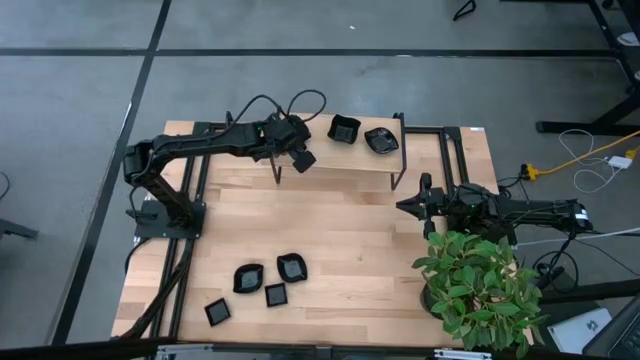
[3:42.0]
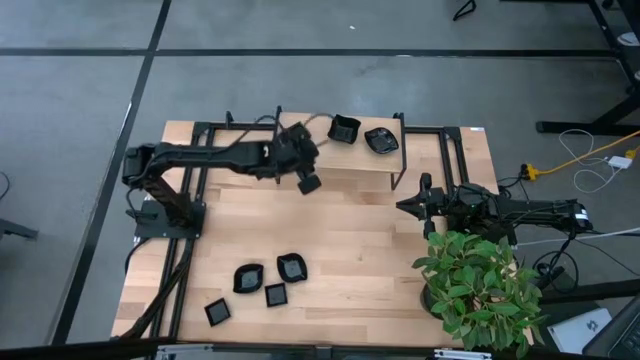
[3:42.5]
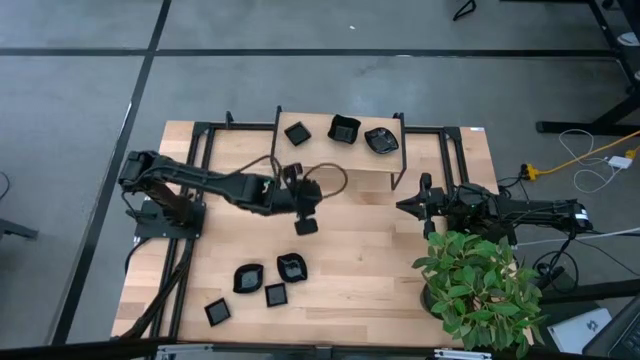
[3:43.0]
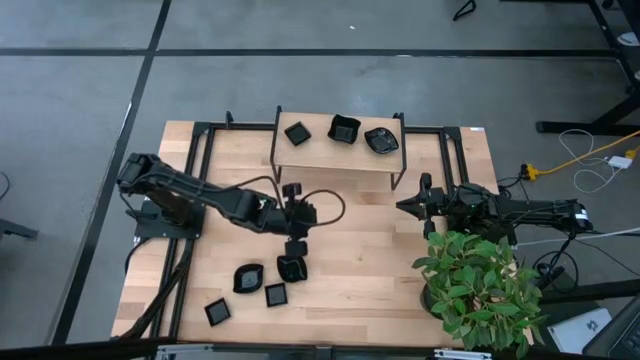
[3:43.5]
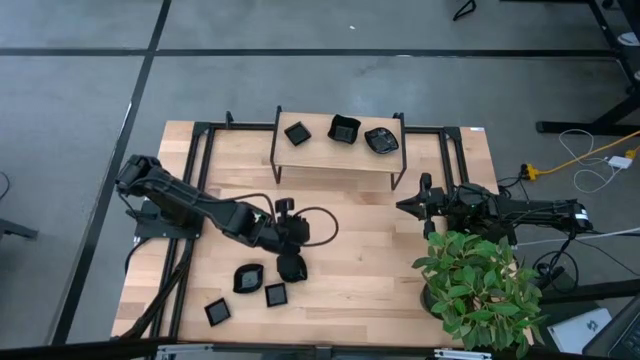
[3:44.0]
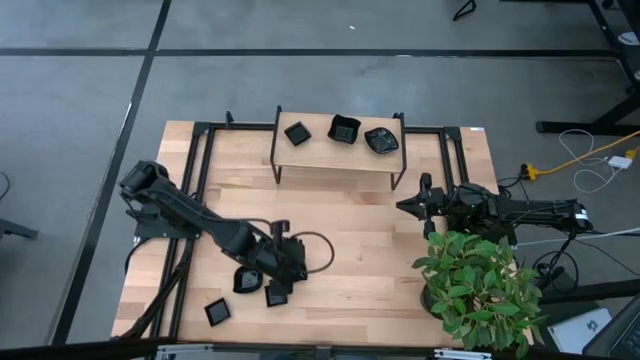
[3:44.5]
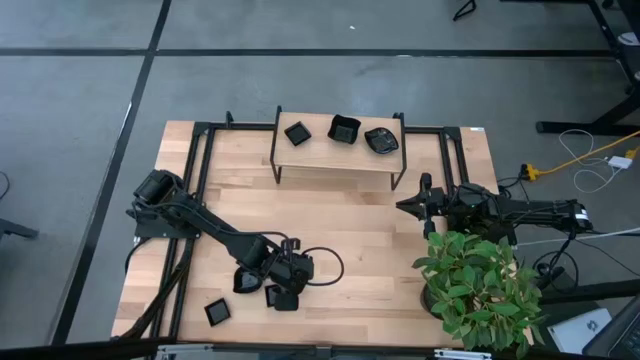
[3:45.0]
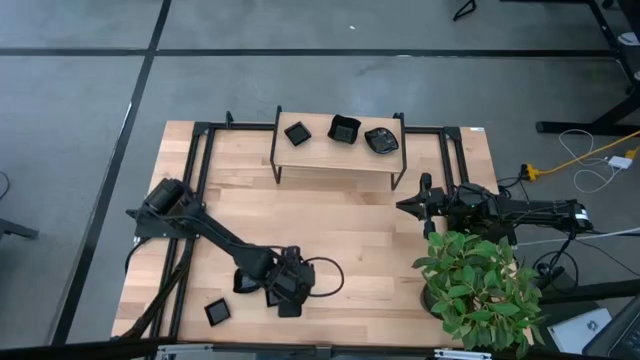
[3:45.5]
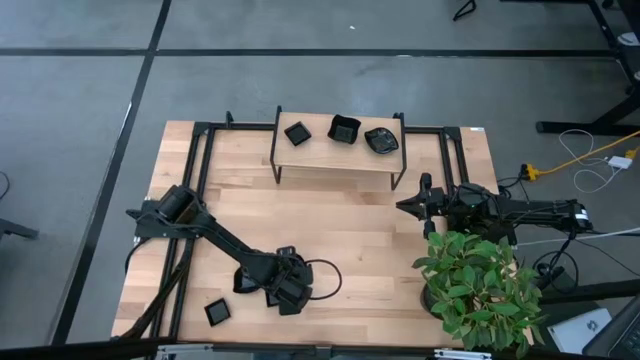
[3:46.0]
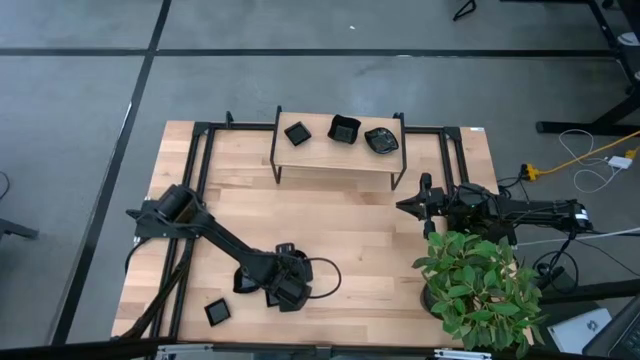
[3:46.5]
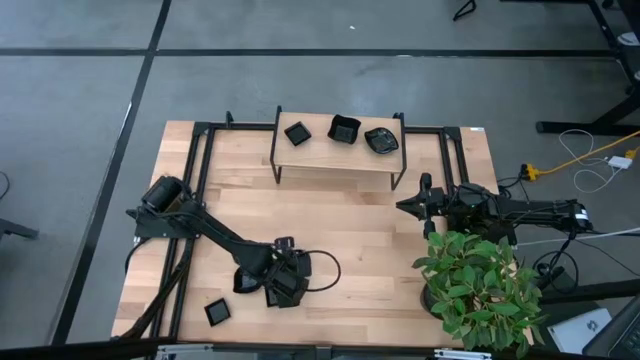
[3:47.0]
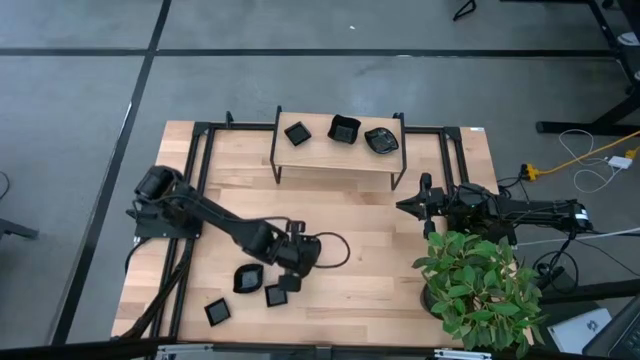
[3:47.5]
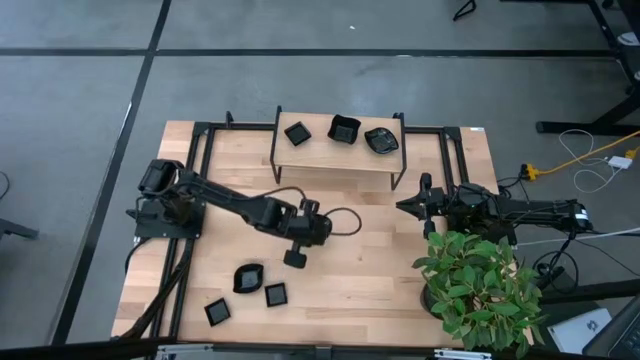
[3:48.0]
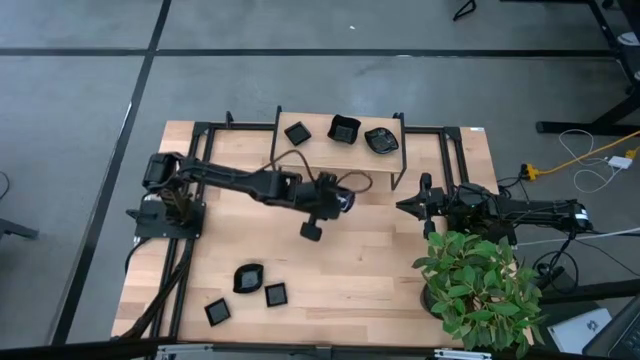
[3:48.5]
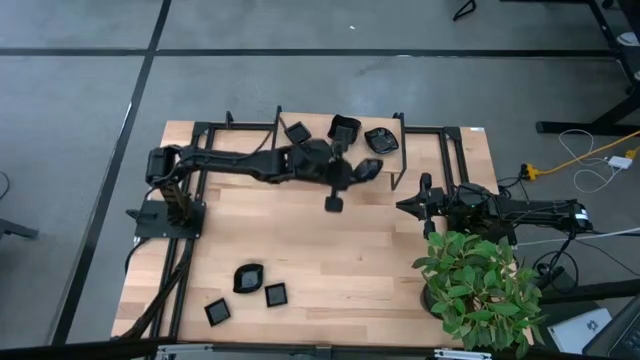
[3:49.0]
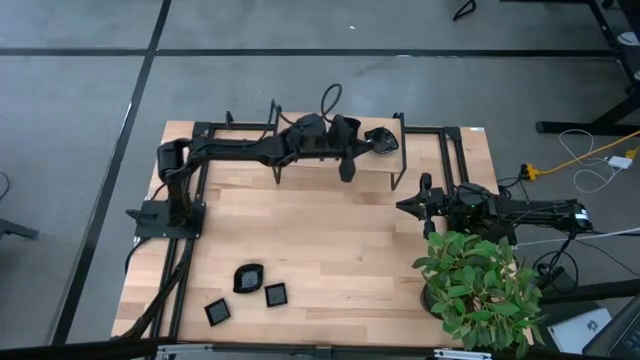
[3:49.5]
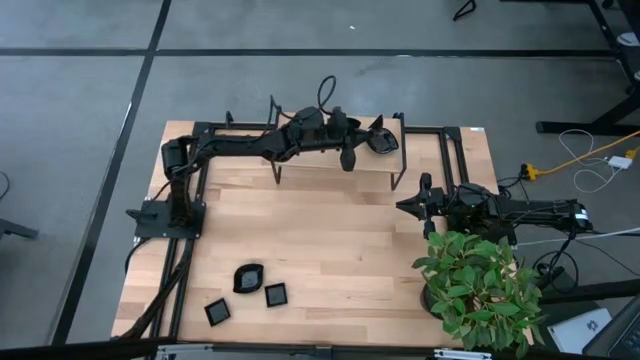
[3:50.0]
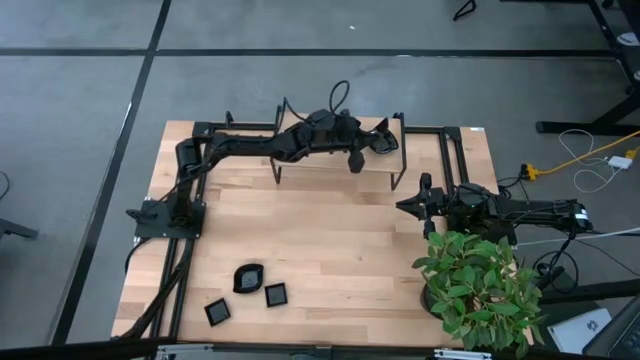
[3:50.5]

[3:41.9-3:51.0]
Task: Pick & Place Mini shaped plates
Stack the leaf-shaped plate on top of the leaf-shaped plate on the shelf

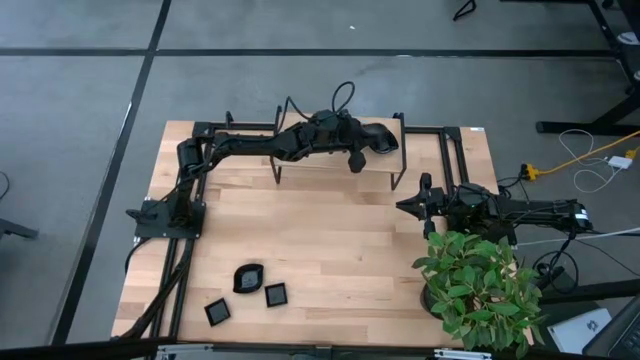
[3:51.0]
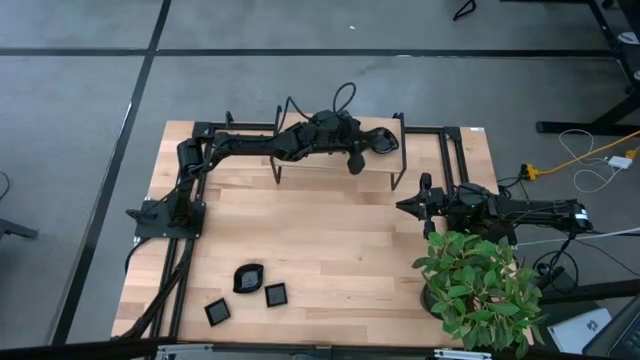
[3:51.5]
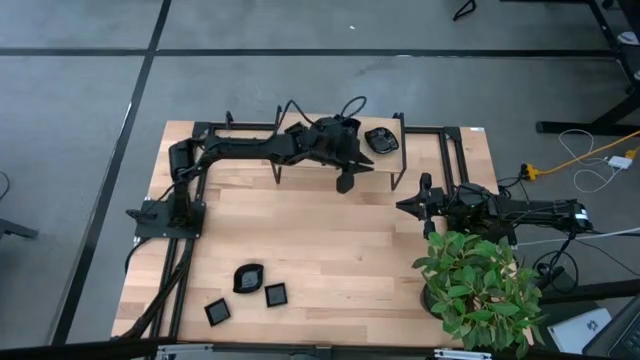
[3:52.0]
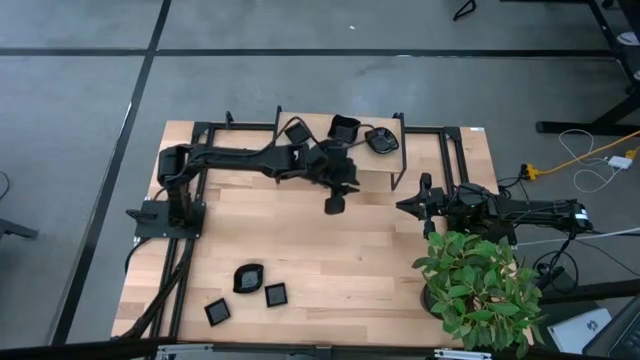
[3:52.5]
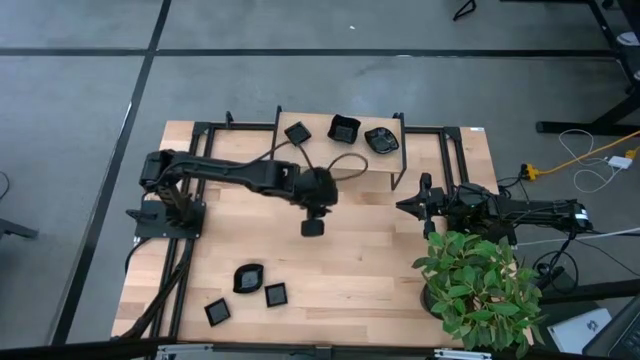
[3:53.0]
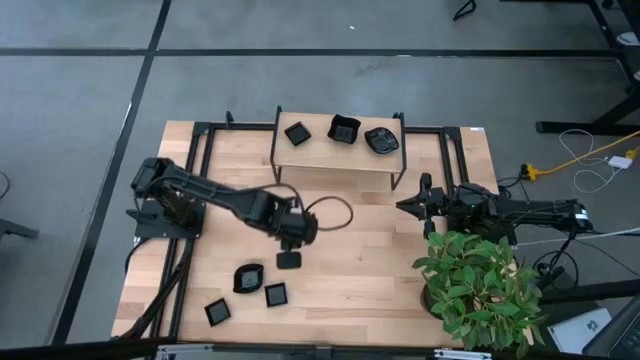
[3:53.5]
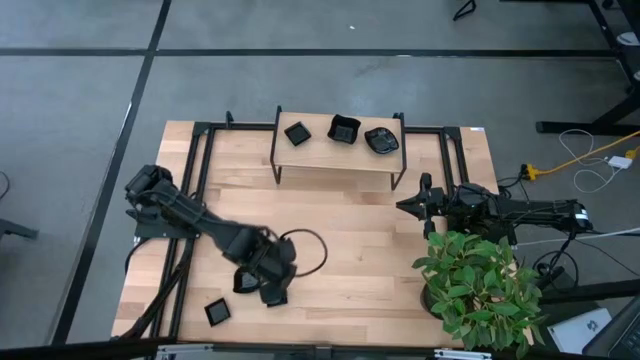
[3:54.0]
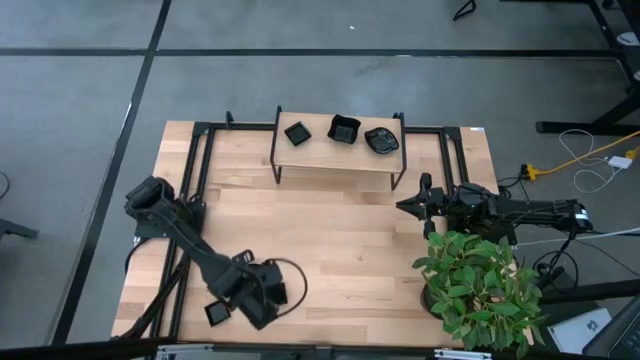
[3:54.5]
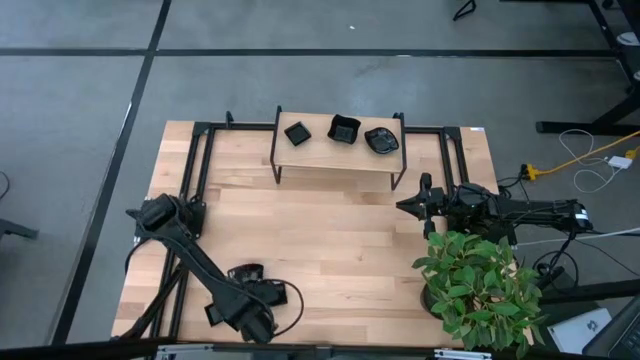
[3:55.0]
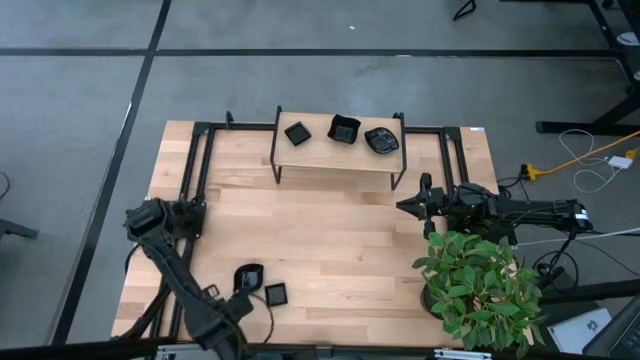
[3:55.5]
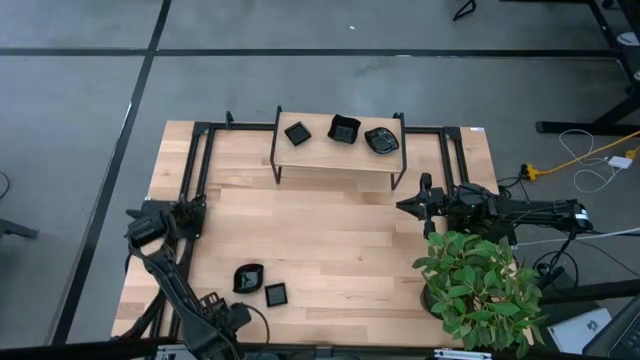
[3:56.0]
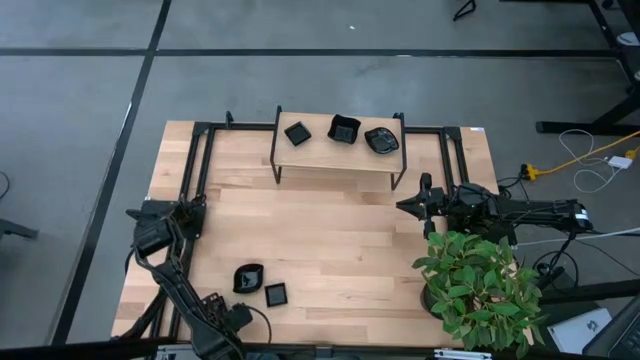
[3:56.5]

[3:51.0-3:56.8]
Stack the square plate on top of the square plate on the shelf

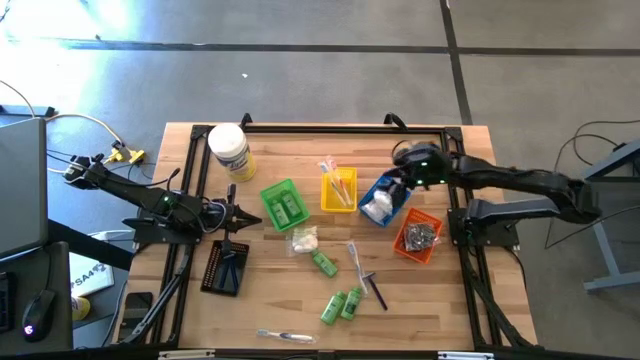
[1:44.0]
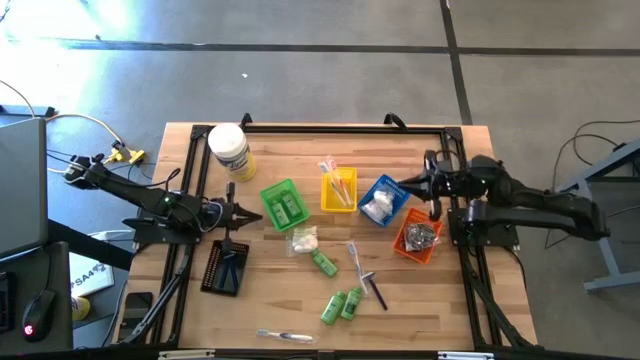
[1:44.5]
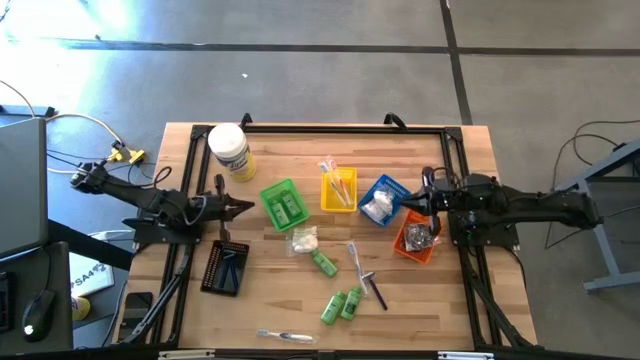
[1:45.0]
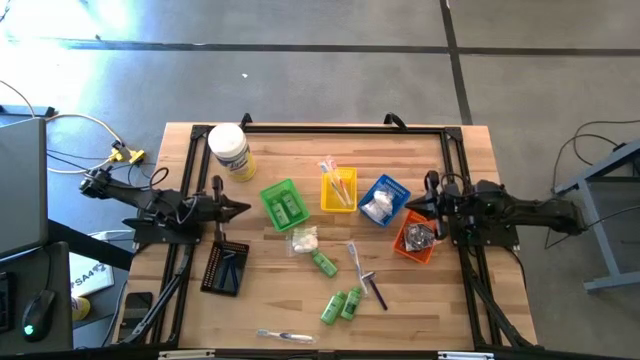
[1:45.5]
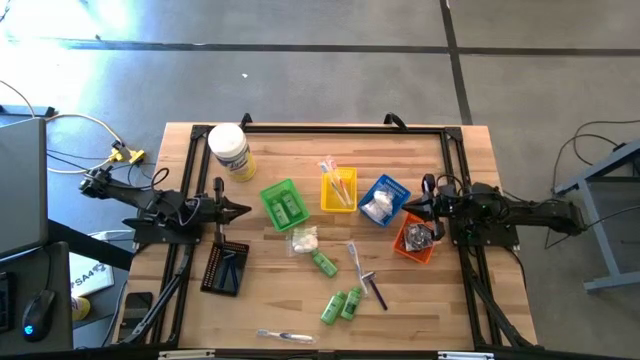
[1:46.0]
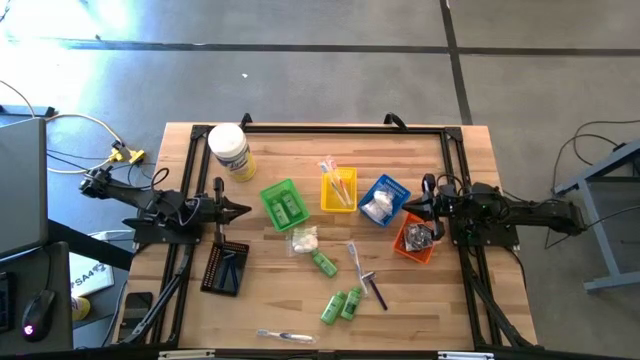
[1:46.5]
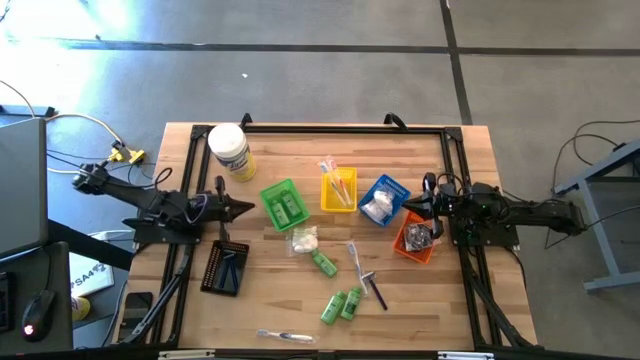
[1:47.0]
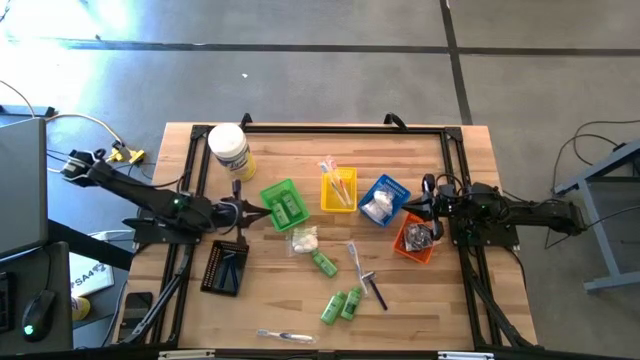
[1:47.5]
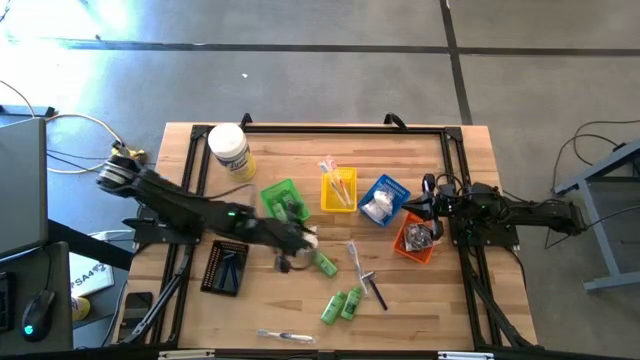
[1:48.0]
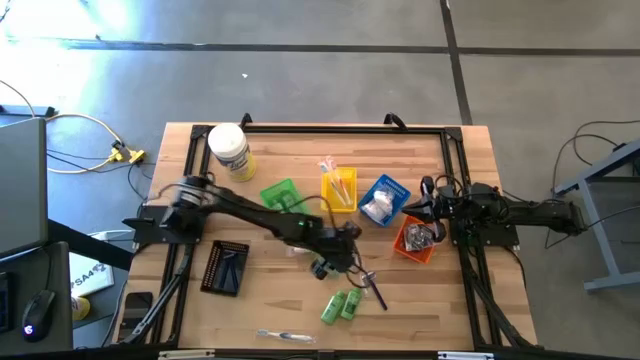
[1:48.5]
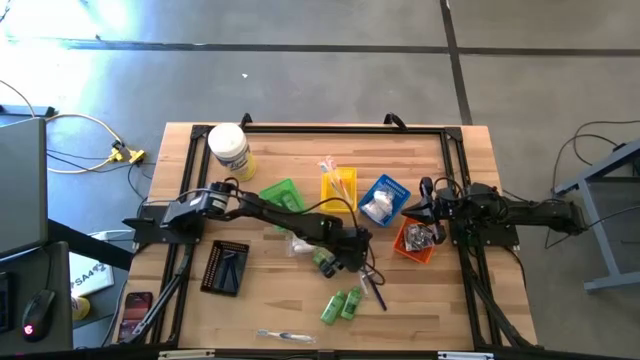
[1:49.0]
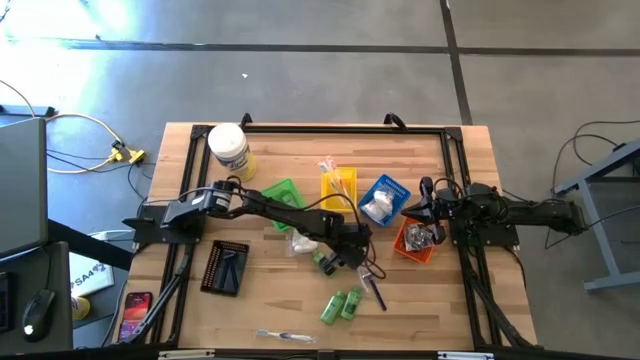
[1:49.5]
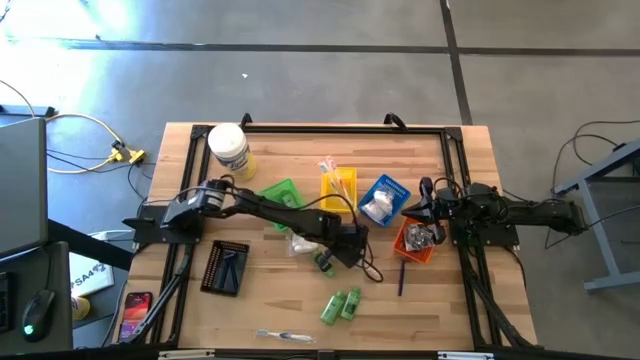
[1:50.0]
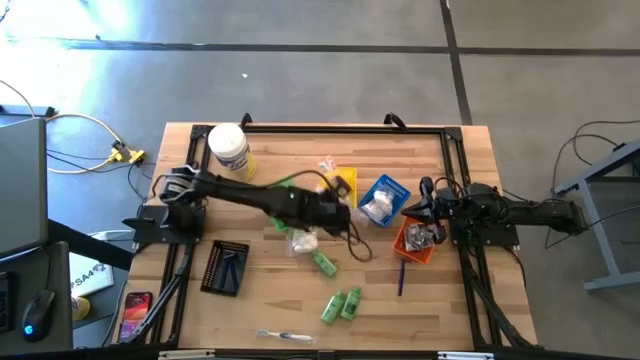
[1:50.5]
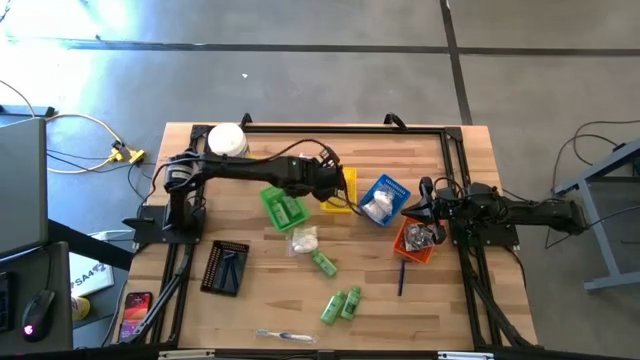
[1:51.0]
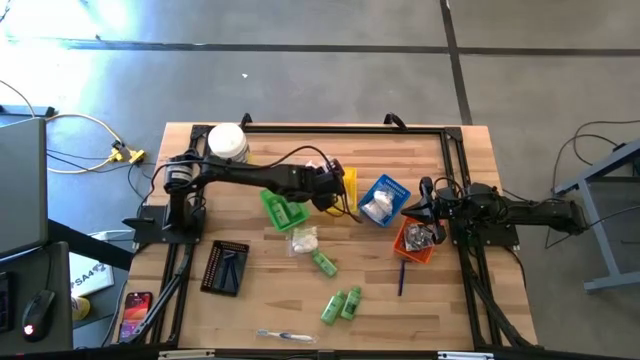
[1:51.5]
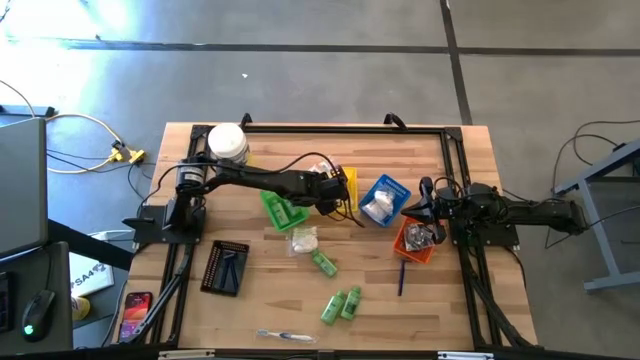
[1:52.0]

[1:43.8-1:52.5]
Task: Pick & Place Travel size toiletries
Put the top blue toothbrush into the yellow bin
